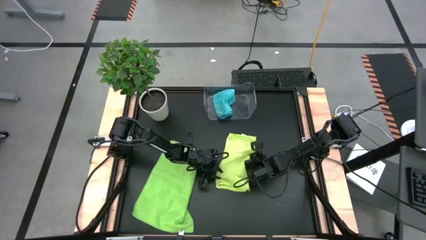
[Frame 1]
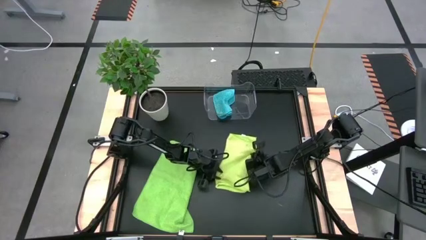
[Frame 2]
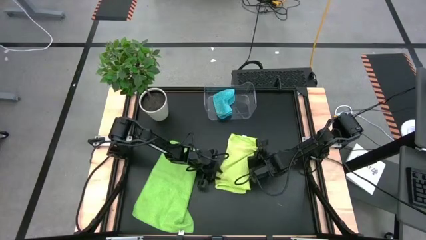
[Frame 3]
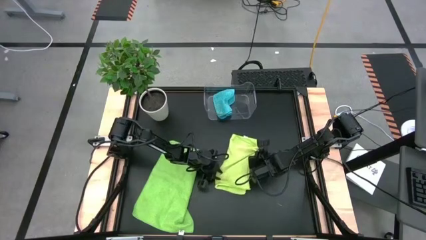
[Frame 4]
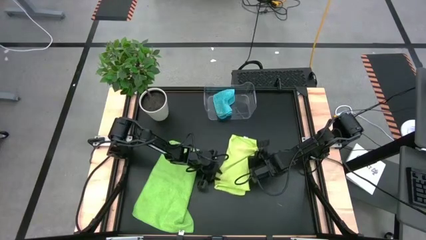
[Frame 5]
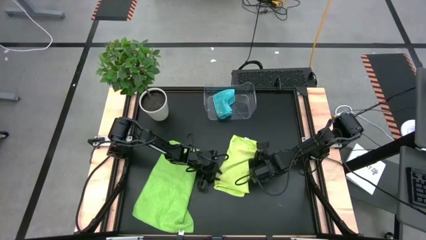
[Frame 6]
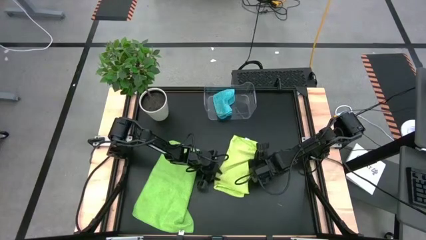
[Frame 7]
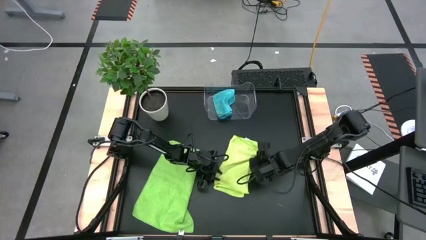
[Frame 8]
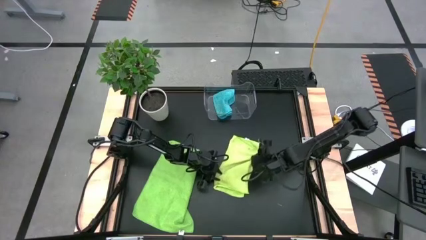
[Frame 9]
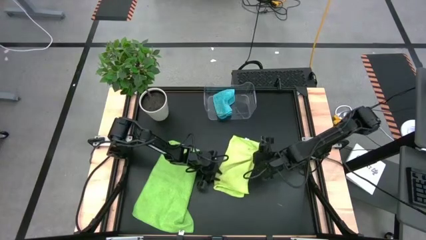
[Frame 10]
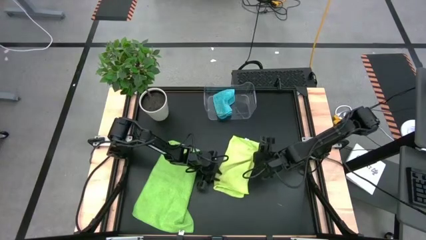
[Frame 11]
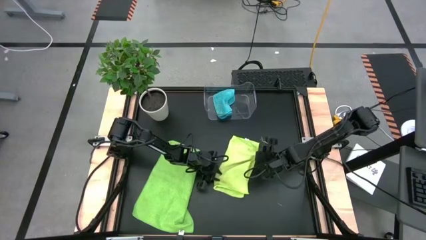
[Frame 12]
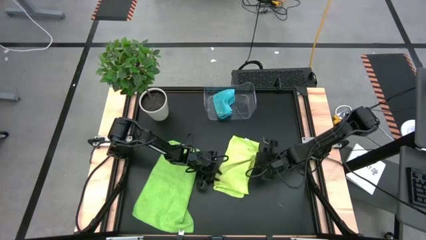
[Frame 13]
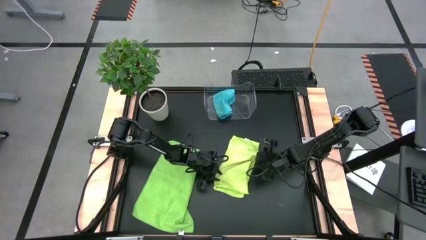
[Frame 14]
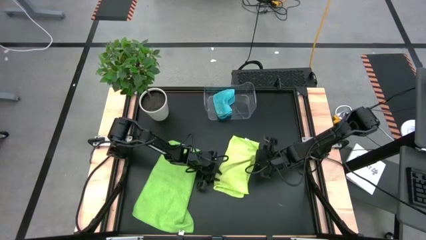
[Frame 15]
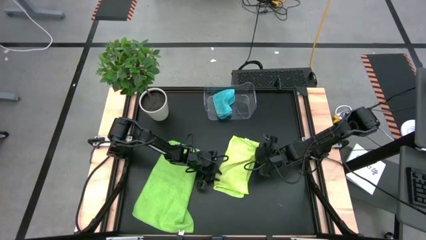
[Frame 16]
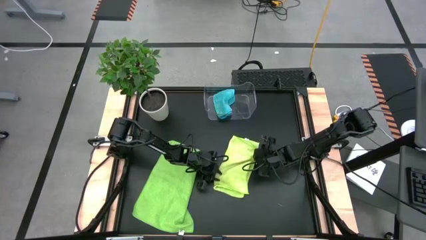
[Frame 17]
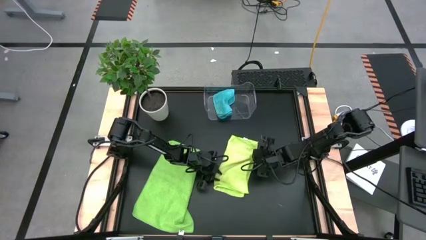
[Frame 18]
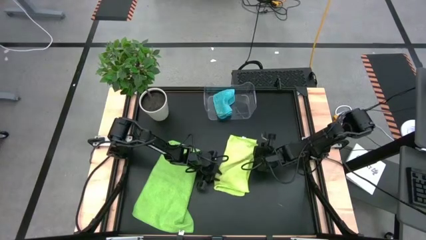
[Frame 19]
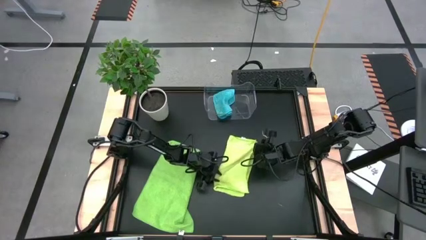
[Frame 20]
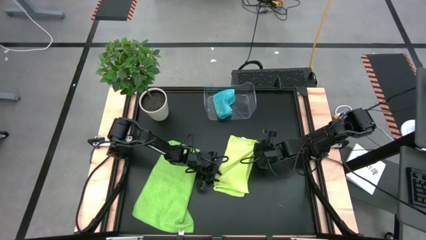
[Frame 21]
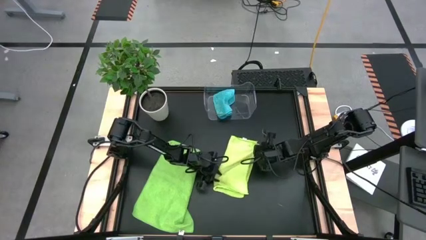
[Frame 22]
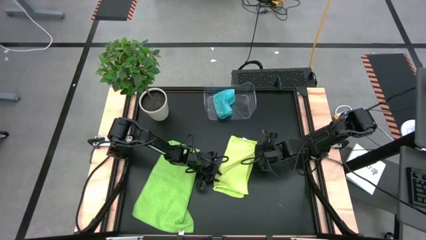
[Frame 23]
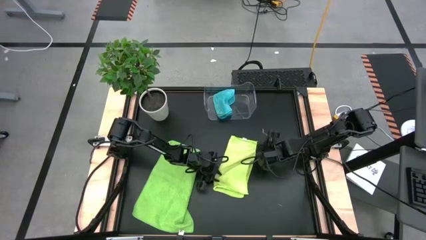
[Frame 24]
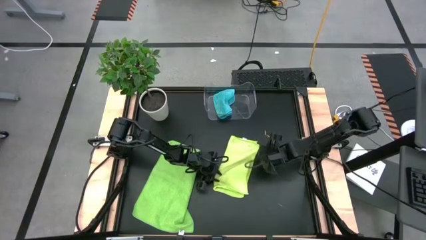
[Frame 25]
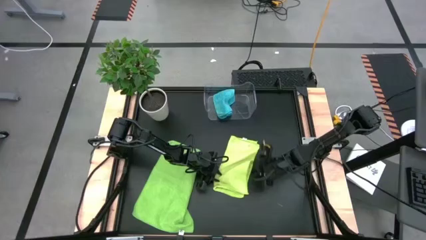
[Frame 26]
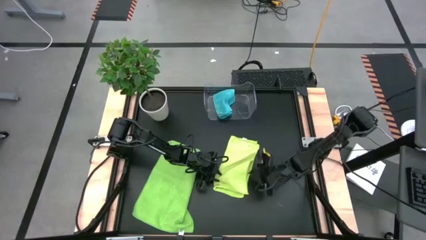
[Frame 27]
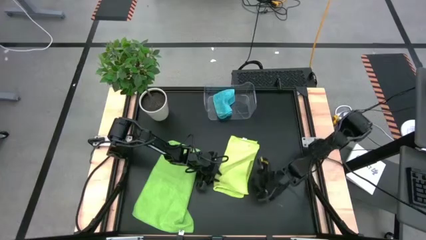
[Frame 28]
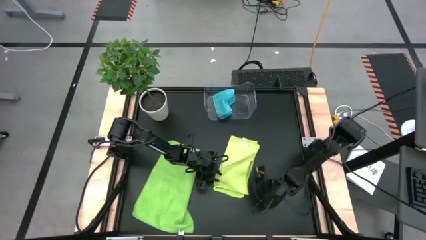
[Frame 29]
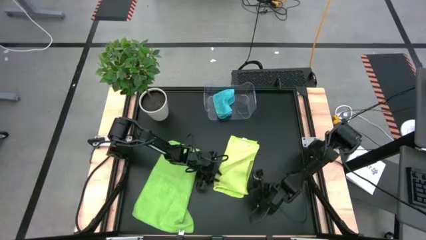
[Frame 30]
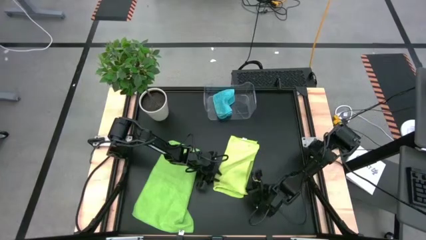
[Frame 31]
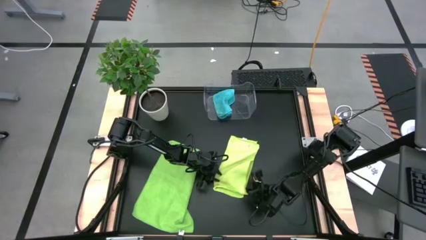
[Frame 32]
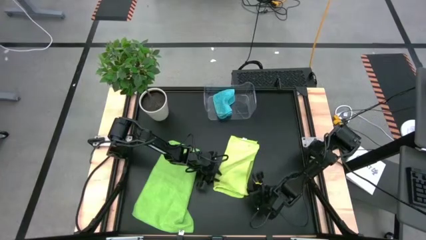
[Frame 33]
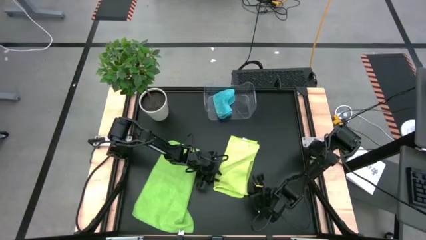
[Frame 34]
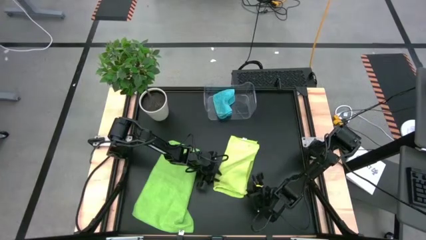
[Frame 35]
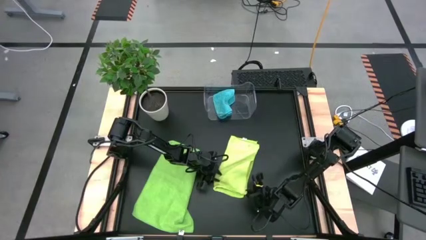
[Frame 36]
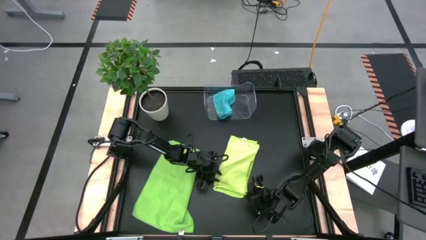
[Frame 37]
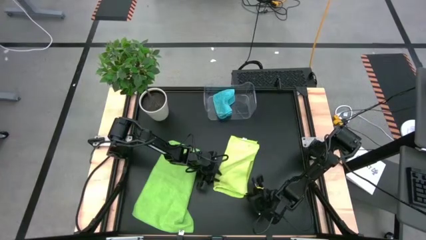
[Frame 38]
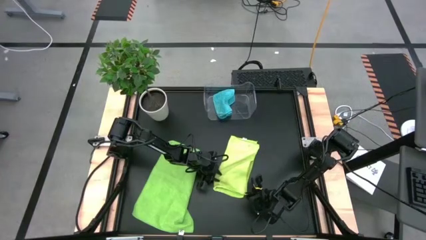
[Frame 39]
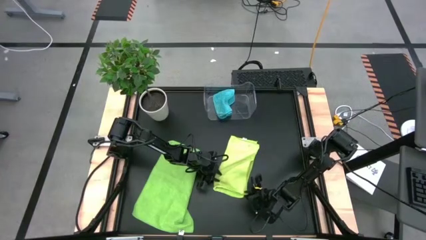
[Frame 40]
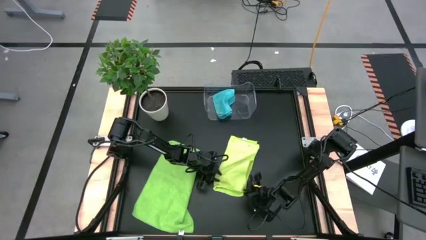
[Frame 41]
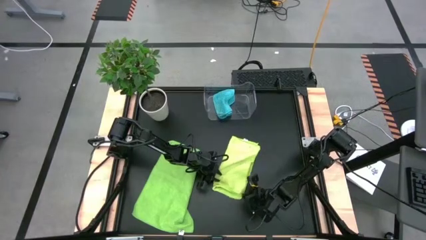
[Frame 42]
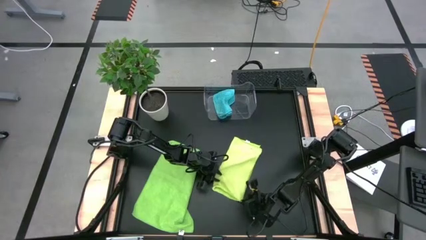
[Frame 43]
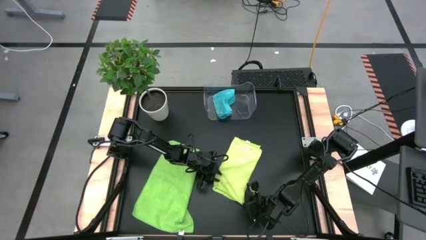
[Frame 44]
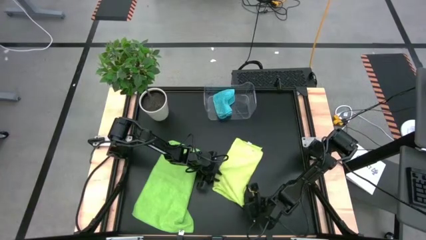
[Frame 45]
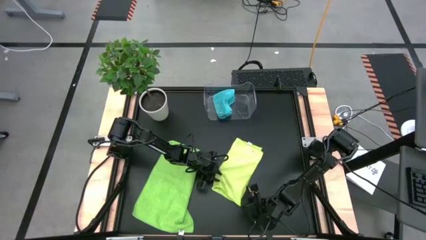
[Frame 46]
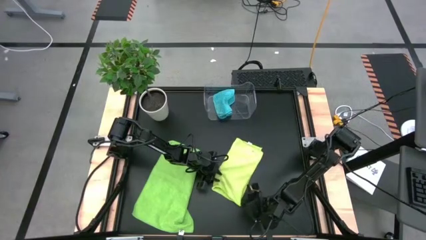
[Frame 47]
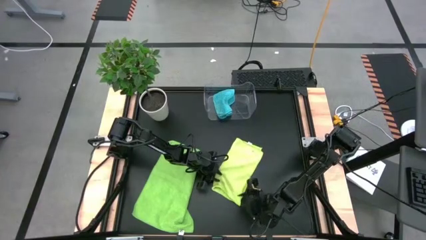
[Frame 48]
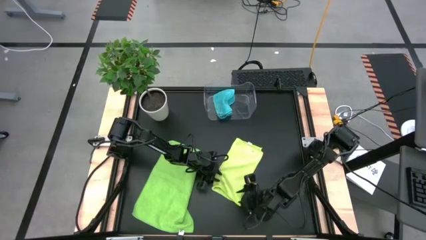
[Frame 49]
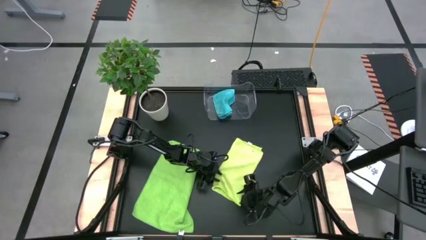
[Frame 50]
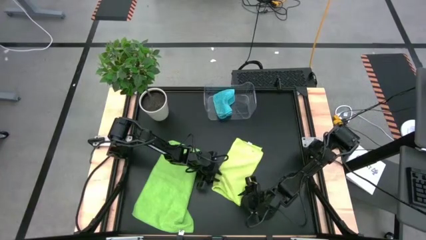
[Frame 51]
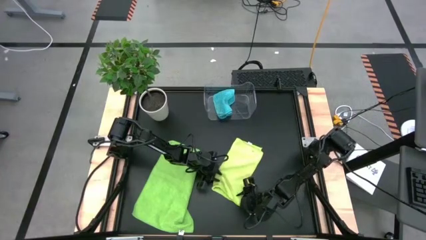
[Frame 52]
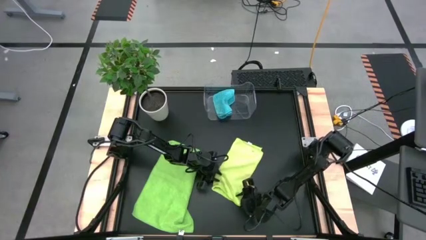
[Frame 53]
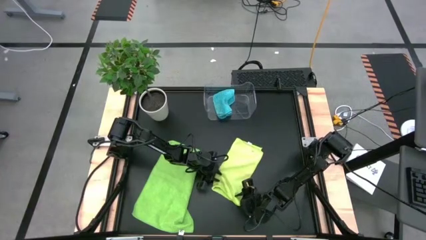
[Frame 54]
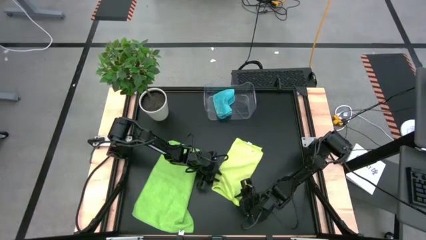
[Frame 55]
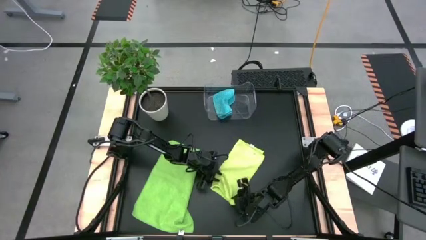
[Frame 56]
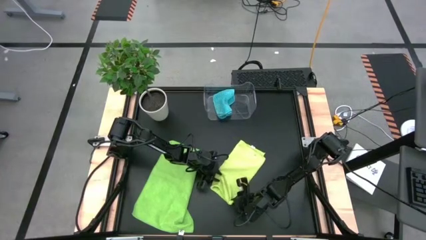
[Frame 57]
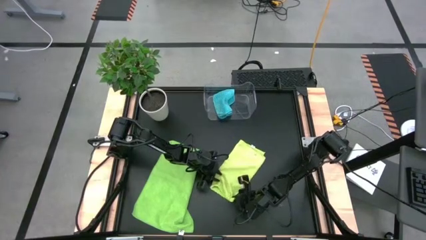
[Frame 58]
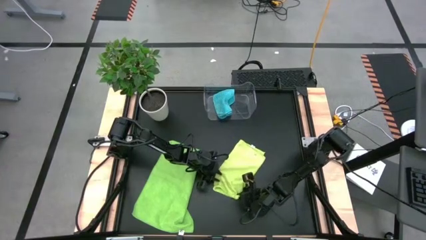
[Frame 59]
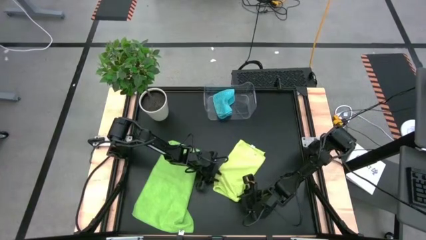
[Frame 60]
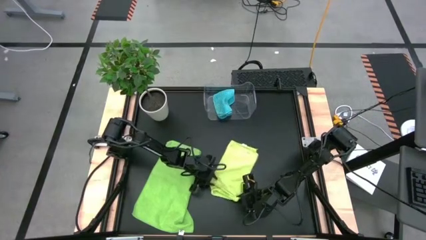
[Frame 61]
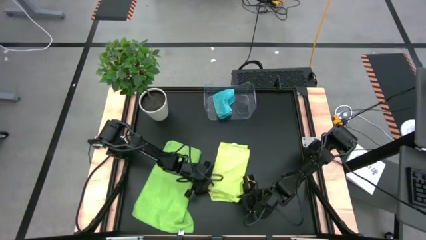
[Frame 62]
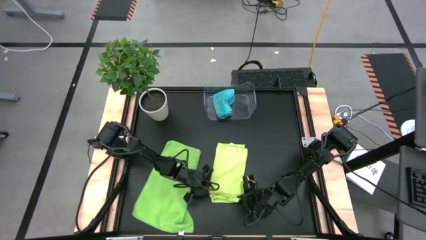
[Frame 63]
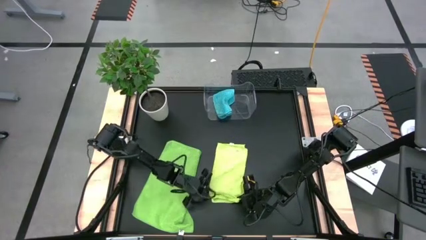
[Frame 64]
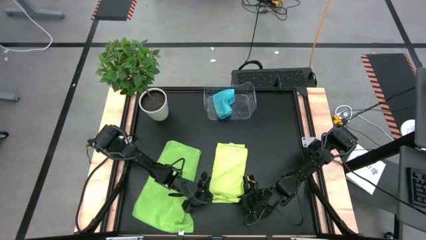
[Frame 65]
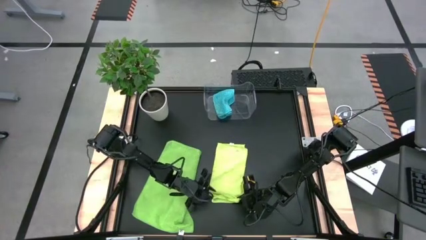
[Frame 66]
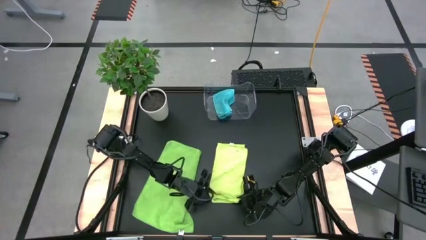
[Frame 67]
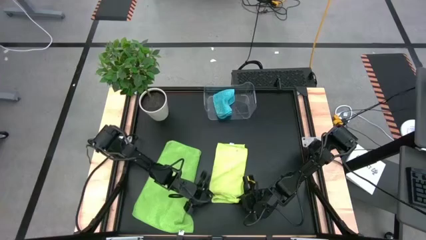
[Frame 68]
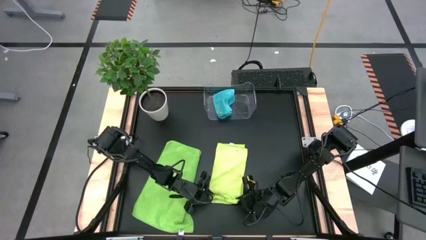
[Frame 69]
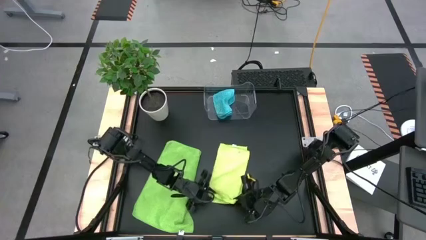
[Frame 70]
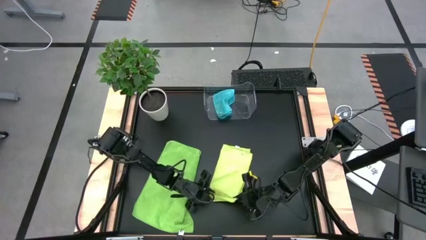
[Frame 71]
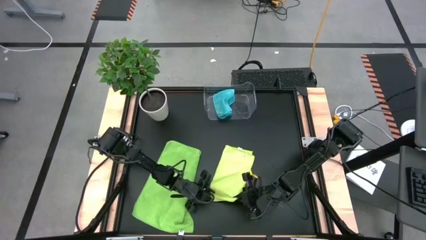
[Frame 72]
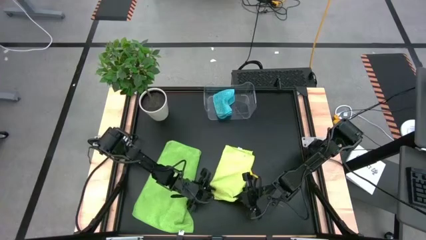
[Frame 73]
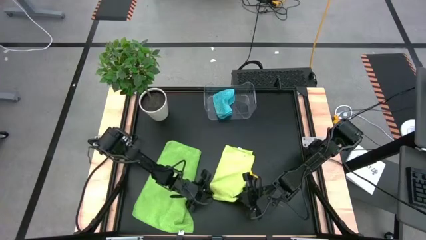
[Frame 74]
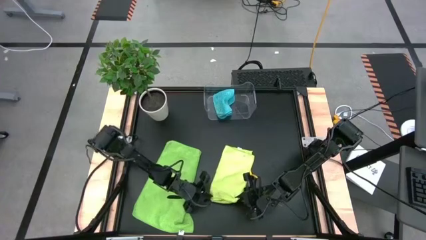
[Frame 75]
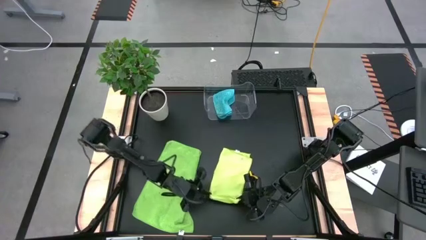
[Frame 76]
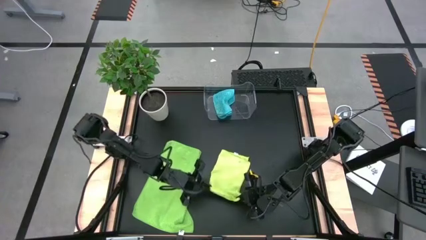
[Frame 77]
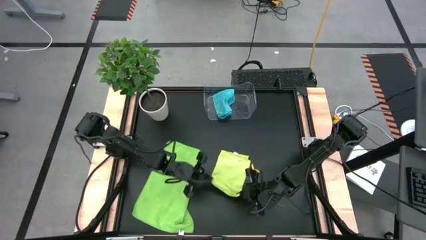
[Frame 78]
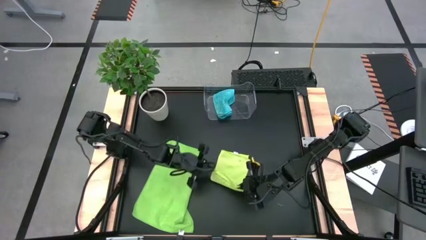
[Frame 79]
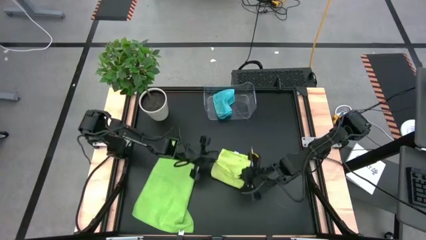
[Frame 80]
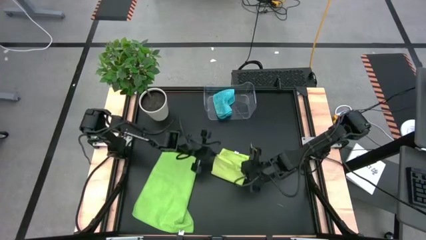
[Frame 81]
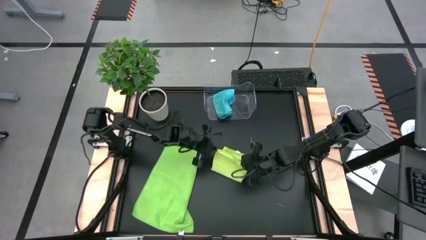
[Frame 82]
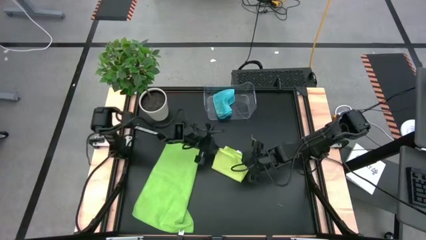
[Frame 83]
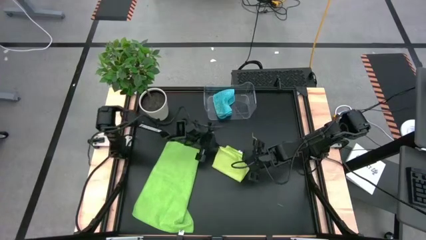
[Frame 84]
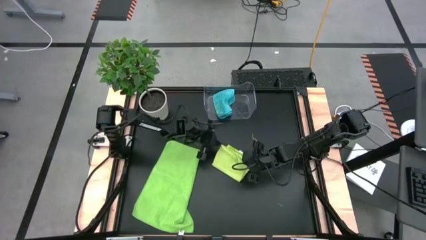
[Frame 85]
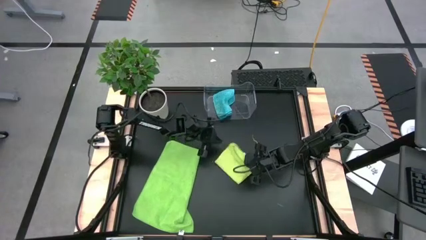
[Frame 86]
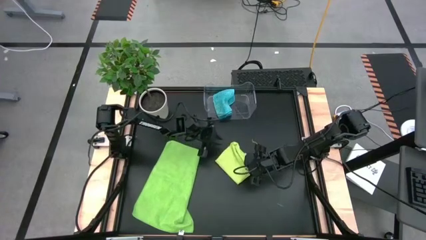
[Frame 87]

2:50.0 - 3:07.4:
Task: Fold microfiber towels
Fold the light green microfiber cloth
